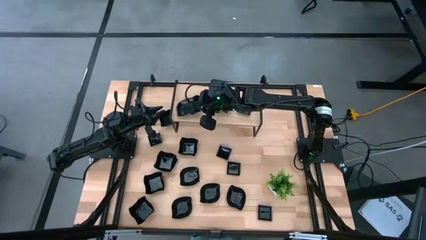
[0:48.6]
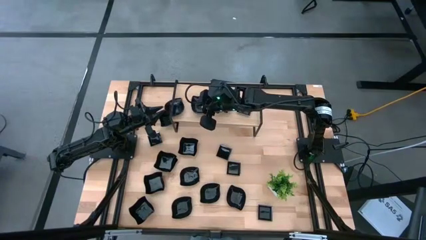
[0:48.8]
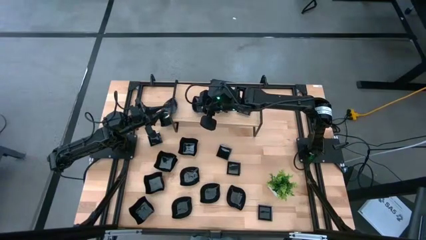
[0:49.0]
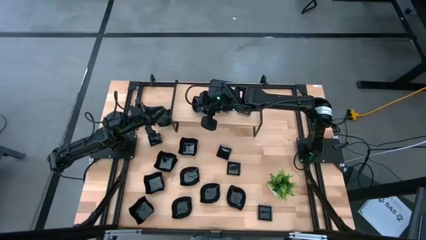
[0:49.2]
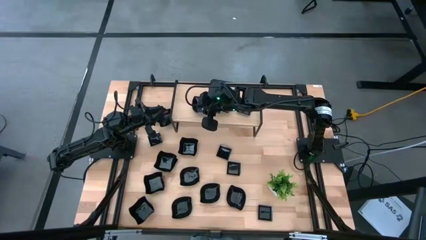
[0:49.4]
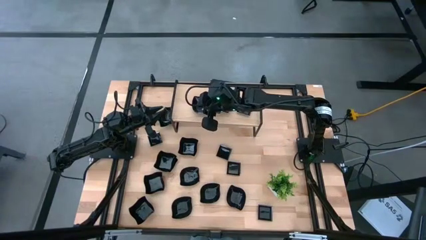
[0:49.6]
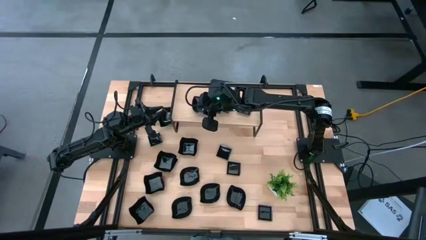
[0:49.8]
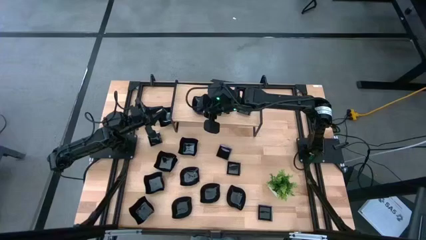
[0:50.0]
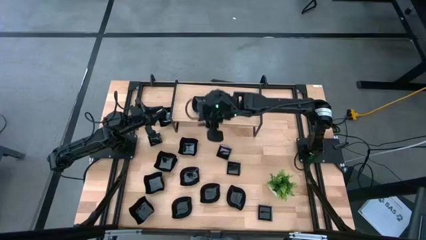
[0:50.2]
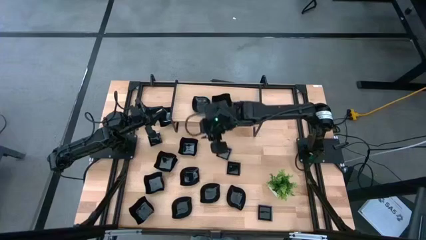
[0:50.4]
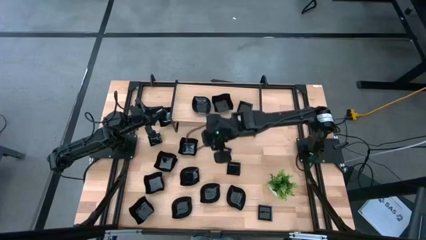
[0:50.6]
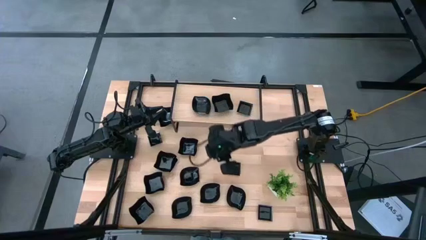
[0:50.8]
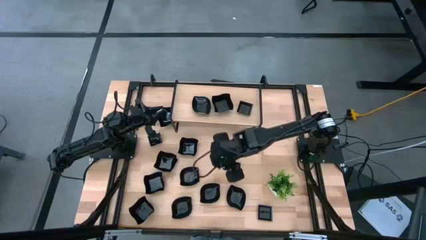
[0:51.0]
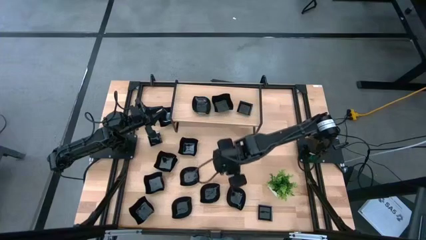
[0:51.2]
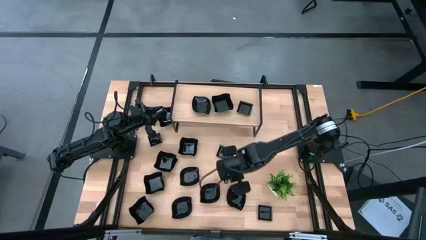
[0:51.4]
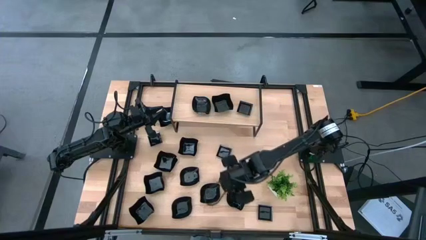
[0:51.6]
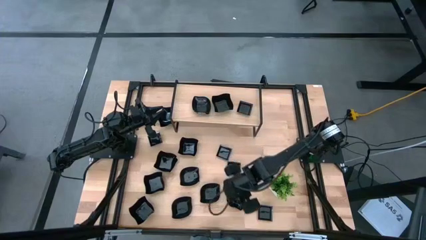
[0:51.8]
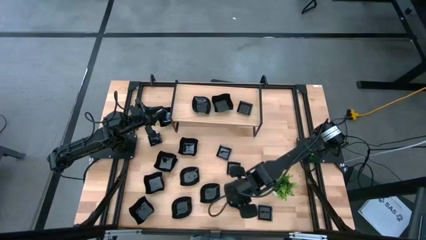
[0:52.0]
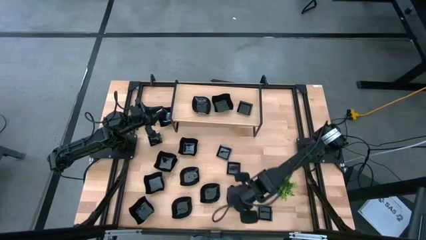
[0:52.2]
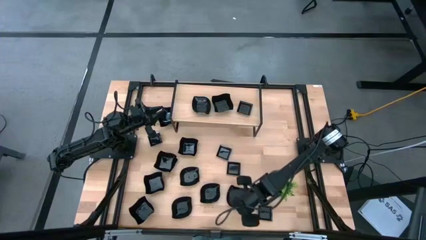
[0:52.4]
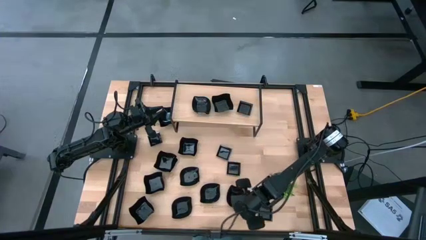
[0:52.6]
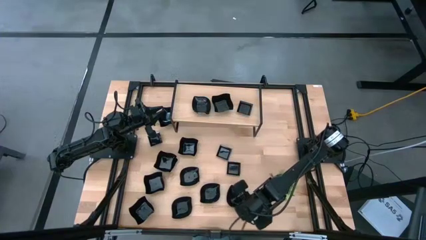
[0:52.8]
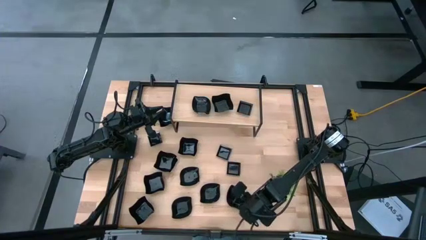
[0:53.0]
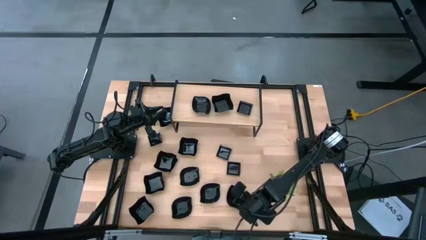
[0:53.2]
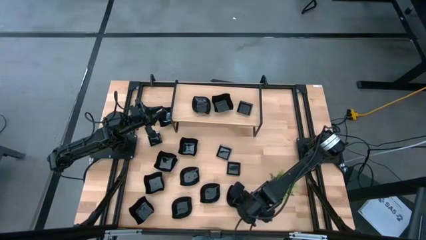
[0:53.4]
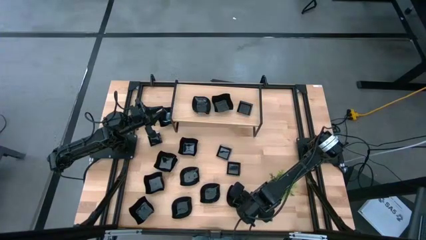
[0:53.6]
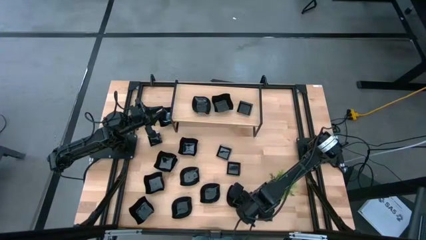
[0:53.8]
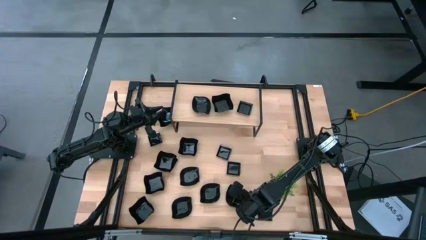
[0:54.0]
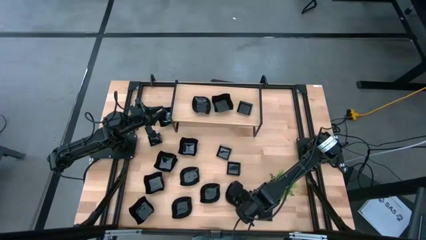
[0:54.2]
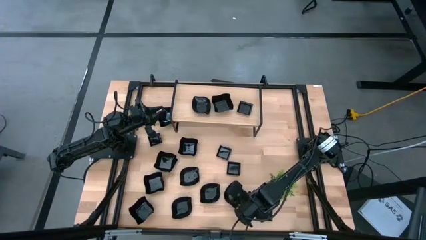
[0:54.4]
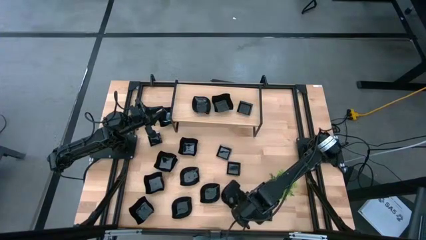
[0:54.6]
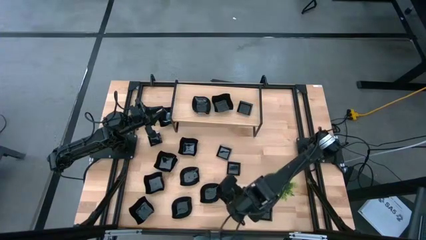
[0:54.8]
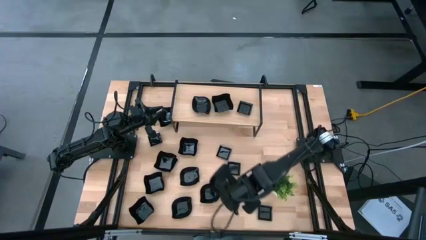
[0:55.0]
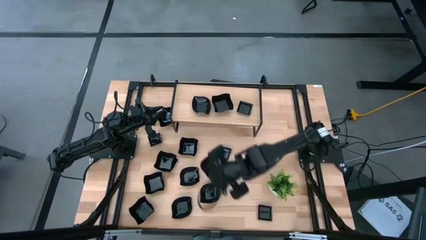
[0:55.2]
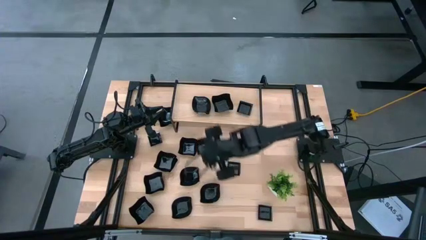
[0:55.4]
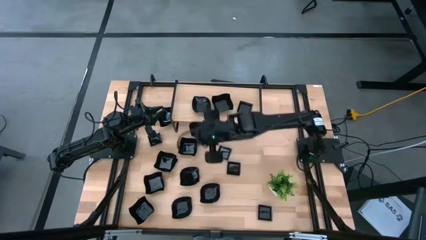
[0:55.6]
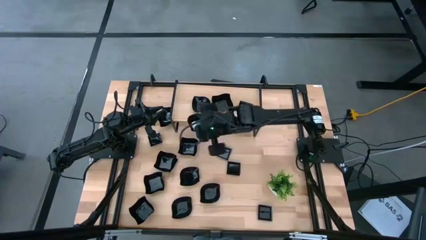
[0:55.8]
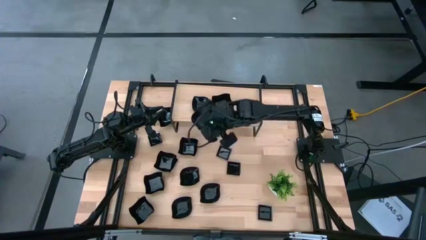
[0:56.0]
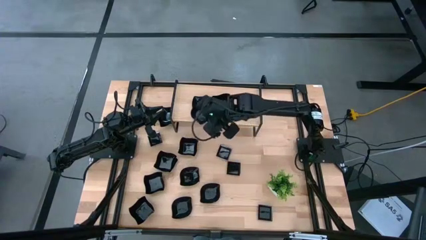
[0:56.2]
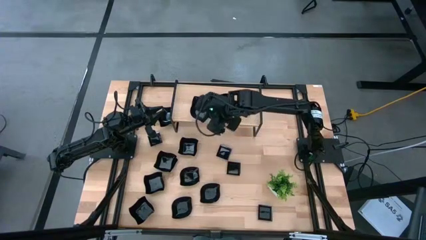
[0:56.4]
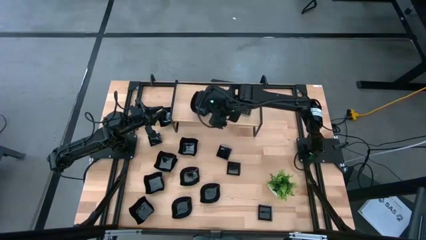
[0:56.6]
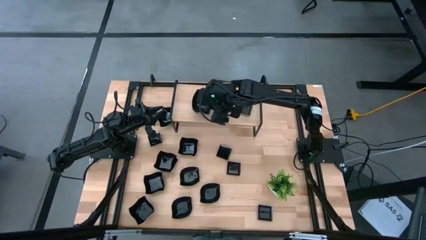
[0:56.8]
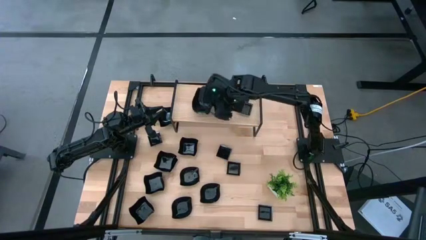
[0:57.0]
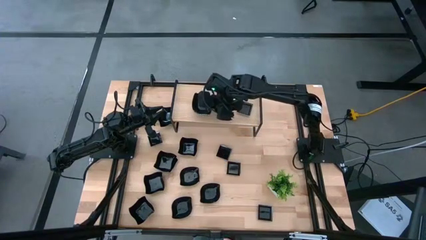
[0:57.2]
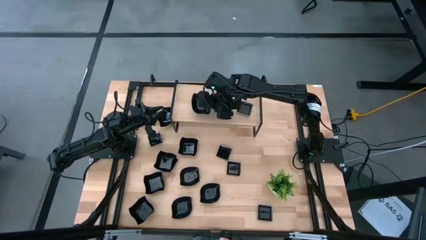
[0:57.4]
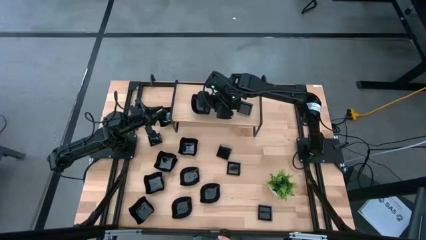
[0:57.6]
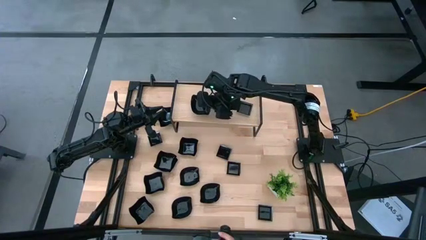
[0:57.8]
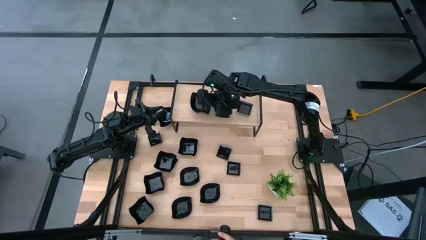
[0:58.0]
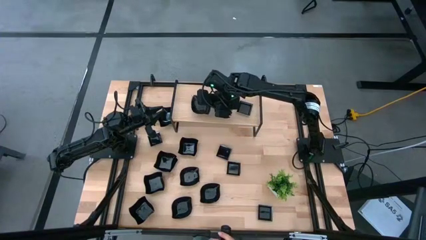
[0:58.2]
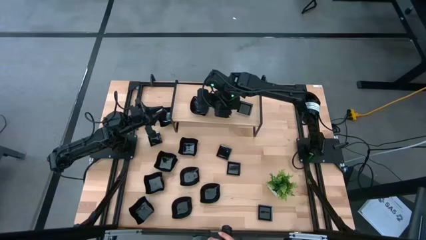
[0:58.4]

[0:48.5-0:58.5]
Task: Pick & Place Mini shaped plates
Stack the leaf-shaped plate on top of the leaf-shaped plate on the shelf
